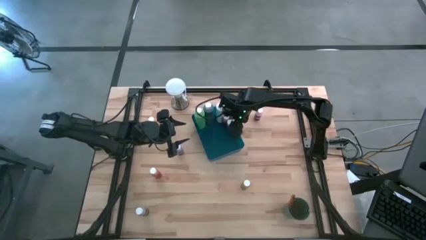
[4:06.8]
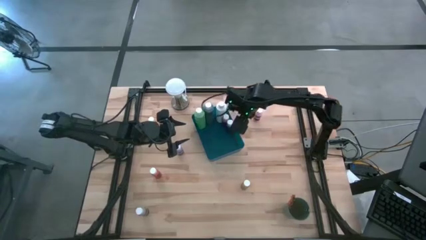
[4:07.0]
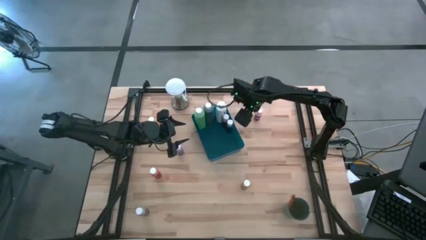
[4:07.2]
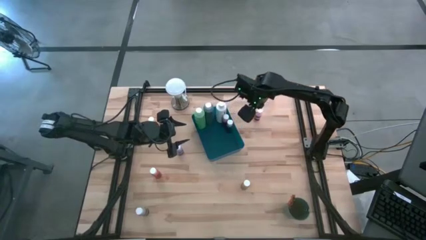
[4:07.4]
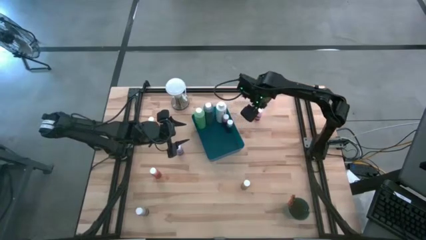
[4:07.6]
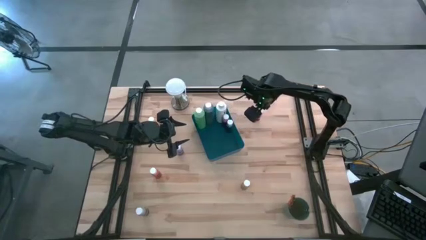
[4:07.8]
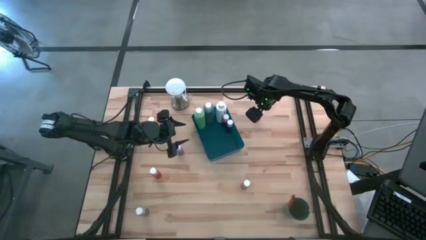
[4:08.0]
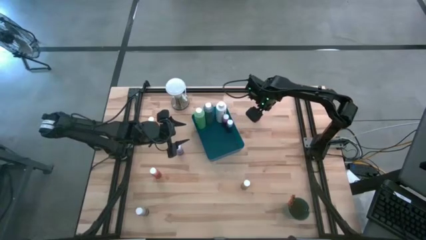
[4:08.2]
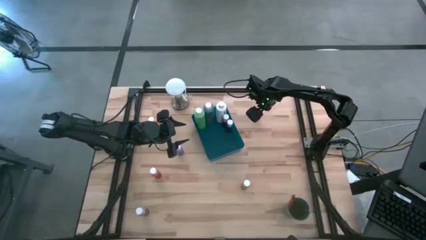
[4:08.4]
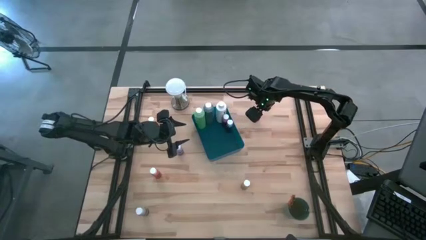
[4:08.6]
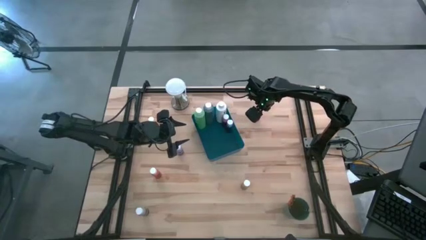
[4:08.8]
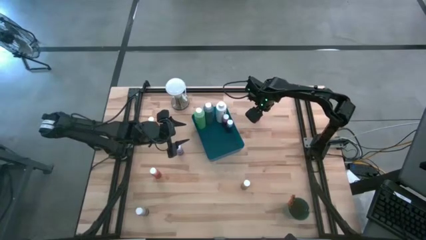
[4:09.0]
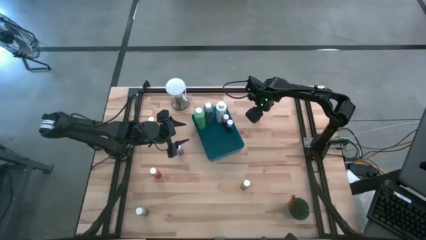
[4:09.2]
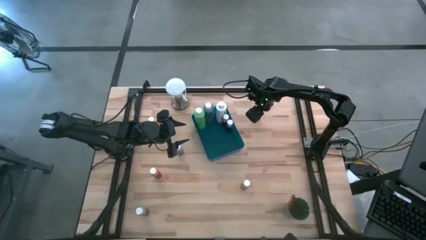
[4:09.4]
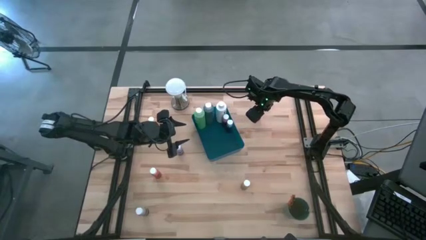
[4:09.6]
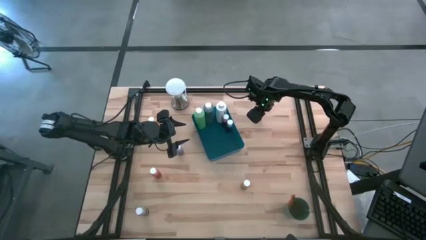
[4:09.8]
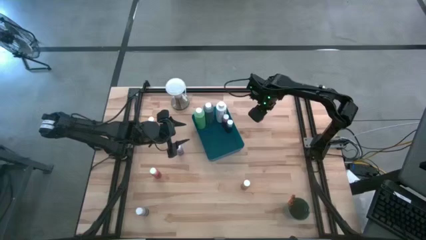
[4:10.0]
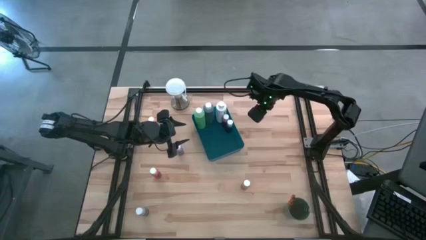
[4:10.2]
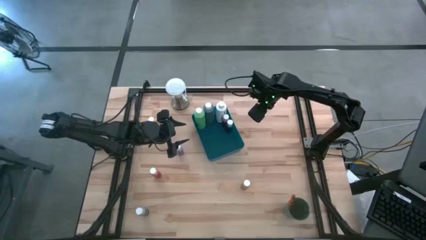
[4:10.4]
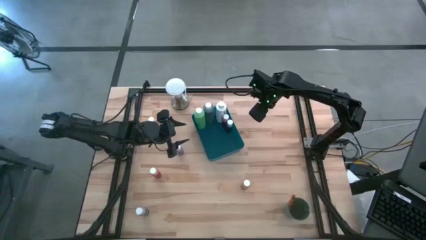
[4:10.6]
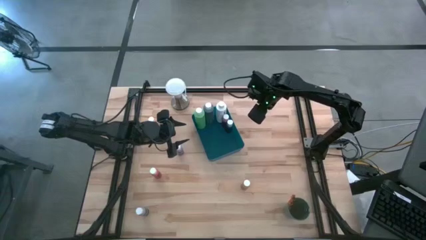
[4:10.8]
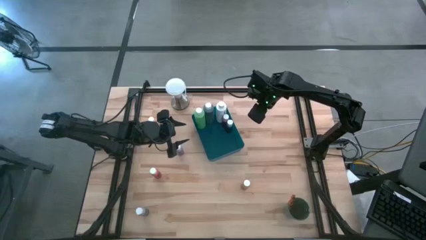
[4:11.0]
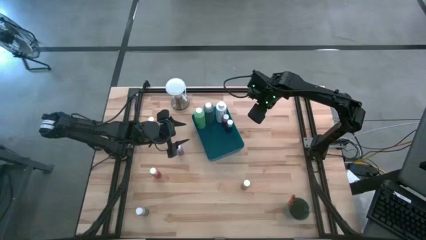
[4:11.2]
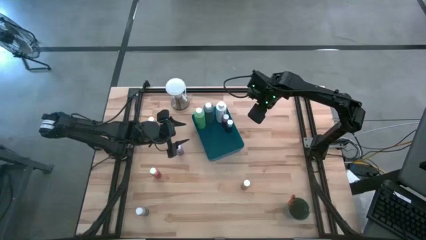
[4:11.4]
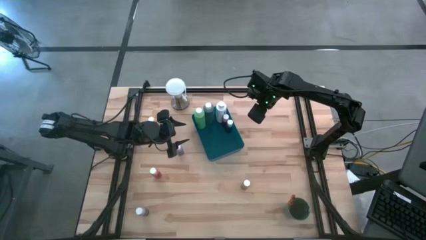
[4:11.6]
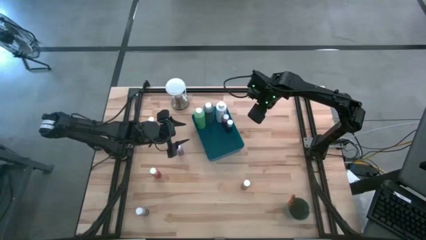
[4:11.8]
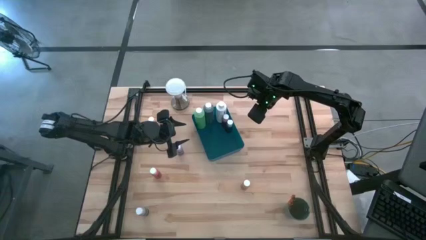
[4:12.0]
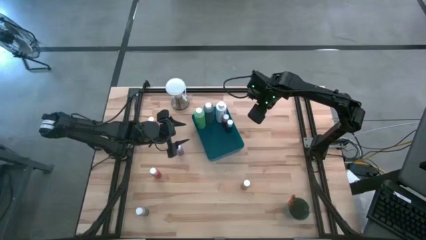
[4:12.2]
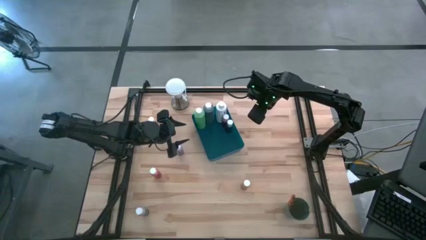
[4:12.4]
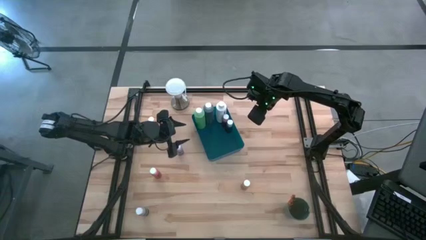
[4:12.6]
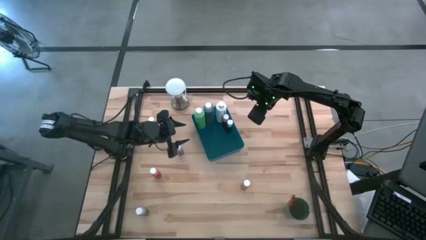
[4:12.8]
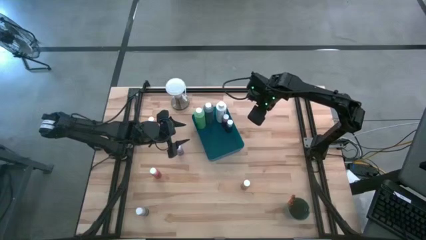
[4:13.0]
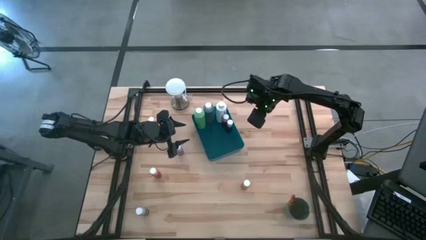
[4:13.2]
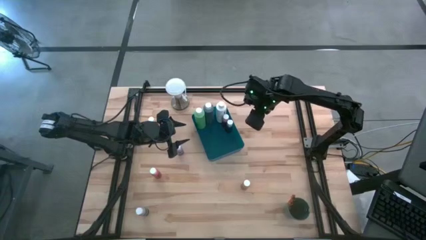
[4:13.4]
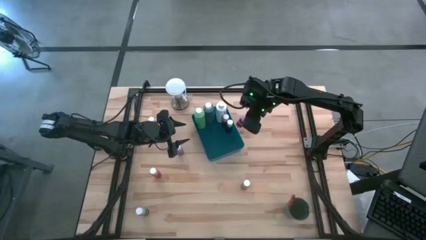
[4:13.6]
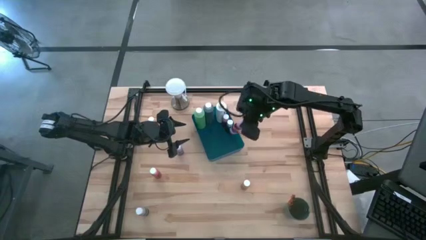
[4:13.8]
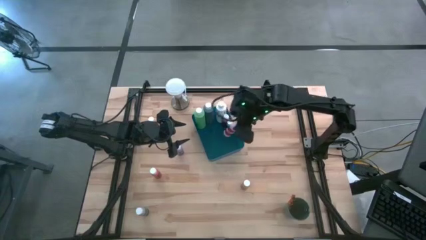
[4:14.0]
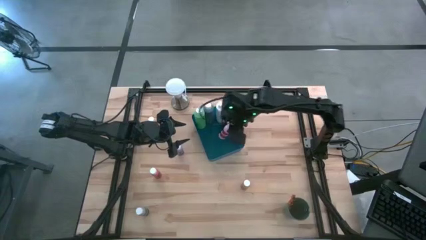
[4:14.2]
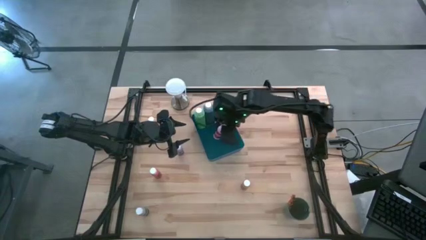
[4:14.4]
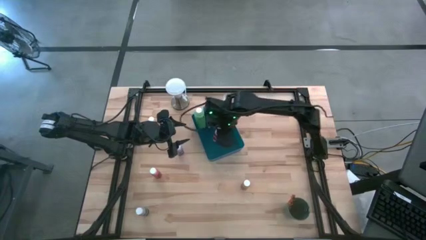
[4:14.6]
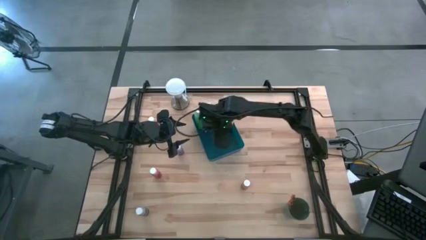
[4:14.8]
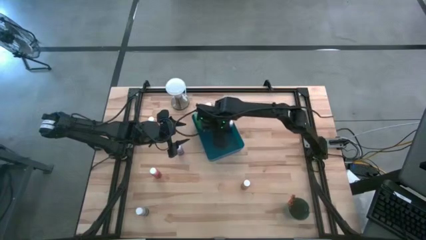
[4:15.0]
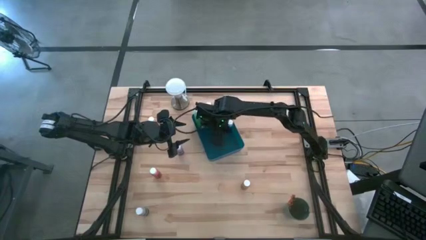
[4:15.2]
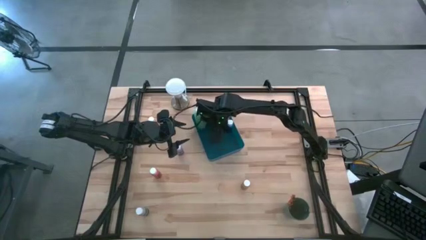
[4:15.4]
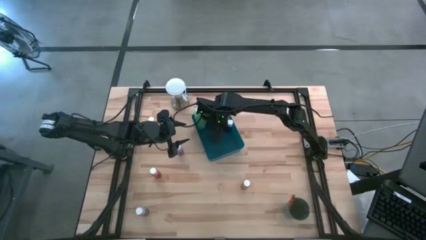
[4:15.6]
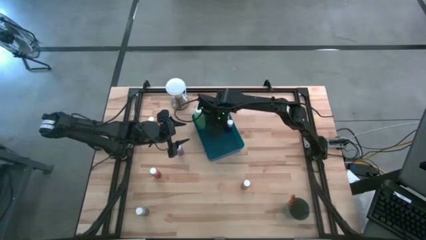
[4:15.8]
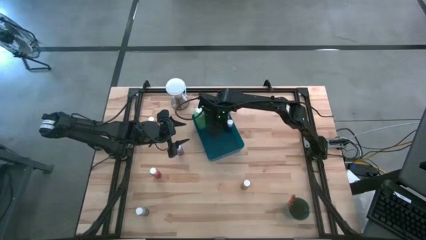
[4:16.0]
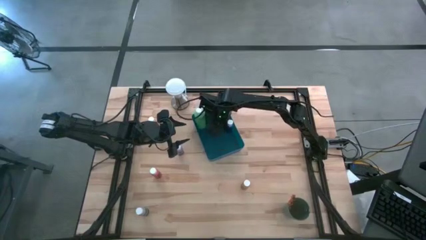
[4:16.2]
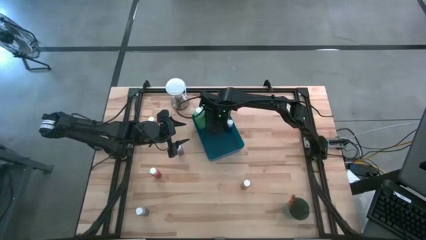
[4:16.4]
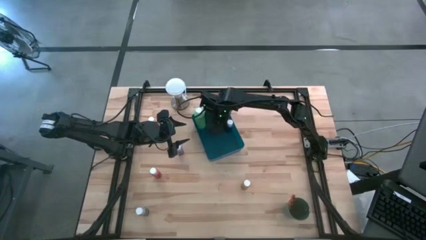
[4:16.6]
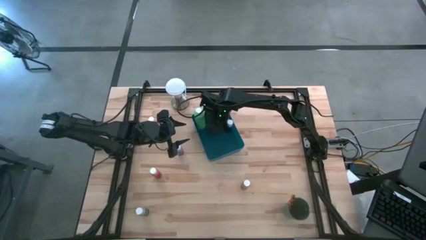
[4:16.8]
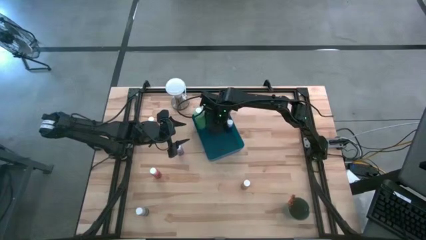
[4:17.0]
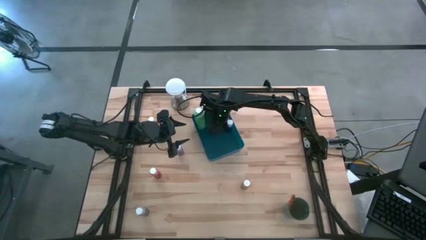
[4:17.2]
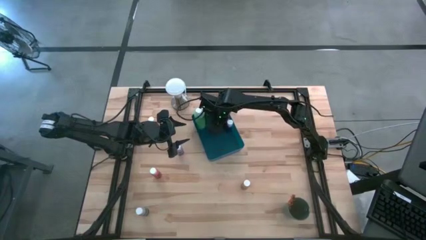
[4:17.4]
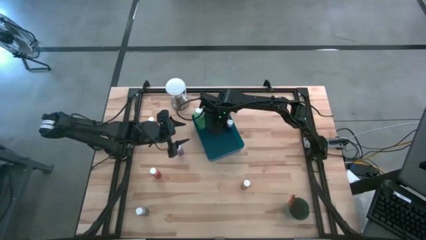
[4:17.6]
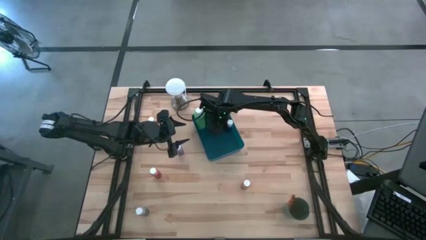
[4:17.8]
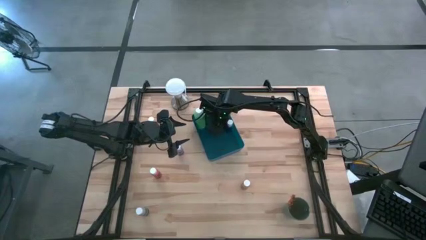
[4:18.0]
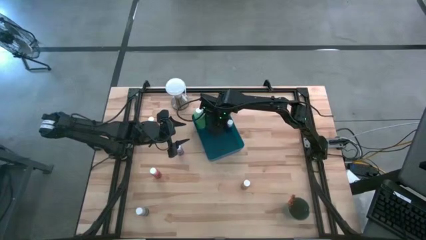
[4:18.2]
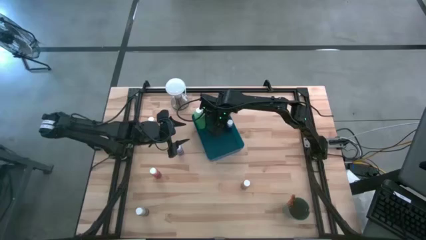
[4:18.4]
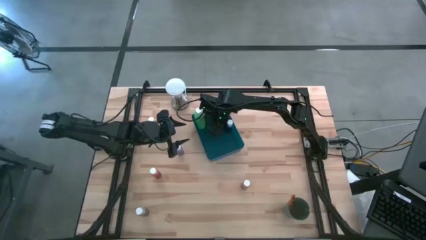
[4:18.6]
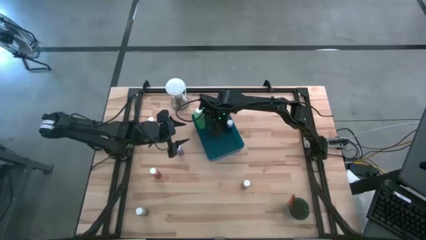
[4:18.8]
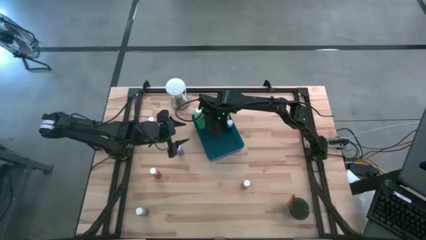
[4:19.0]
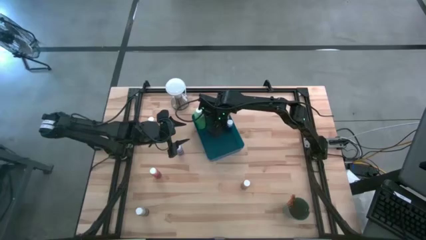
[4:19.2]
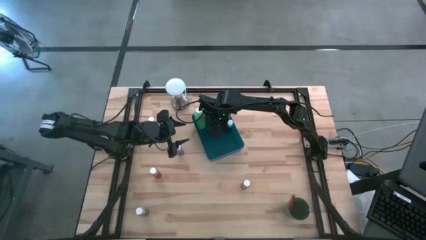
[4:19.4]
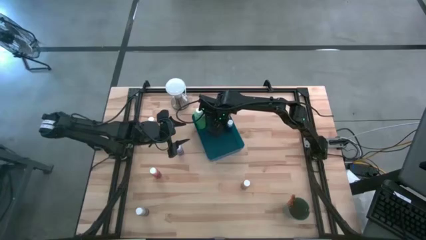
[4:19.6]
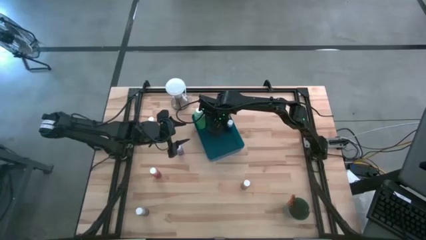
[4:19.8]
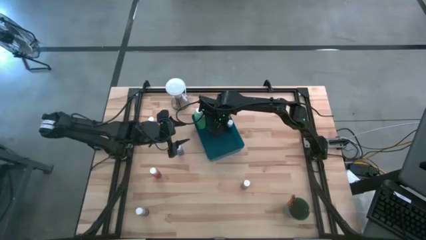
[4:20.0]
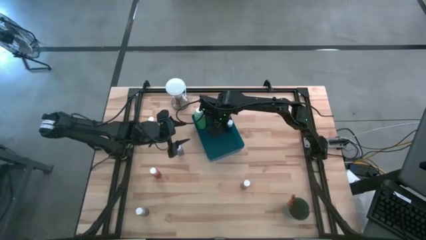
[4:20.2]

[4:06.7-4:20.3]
Task: Pick & Place Paint Supplies
Put the light pink paint bottle into the blue bin
